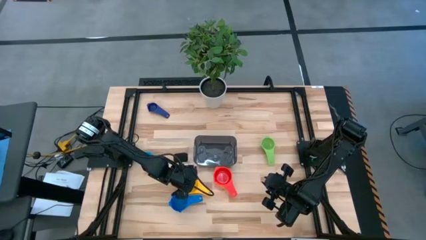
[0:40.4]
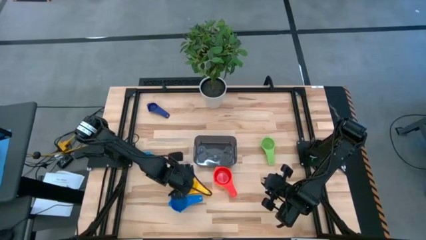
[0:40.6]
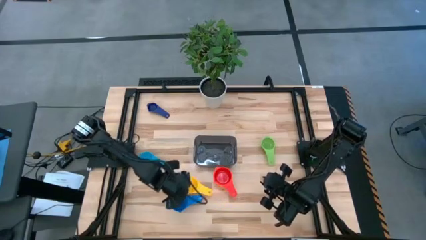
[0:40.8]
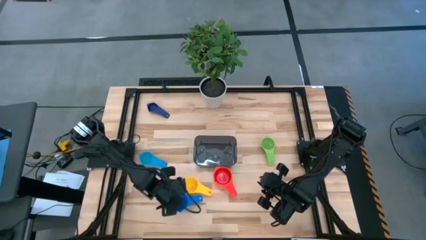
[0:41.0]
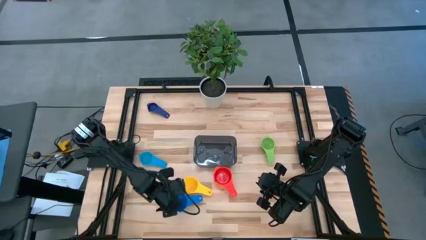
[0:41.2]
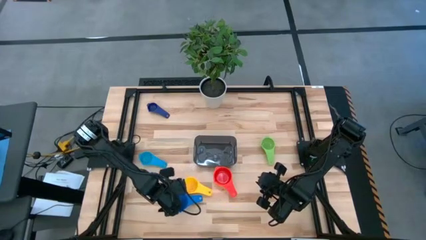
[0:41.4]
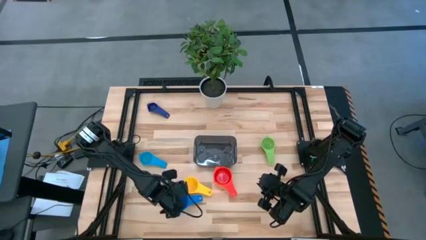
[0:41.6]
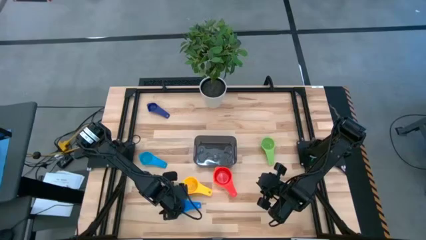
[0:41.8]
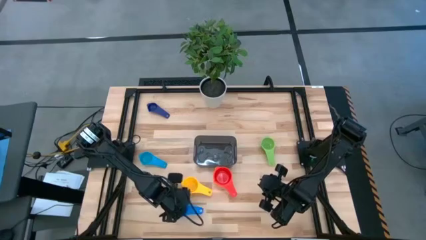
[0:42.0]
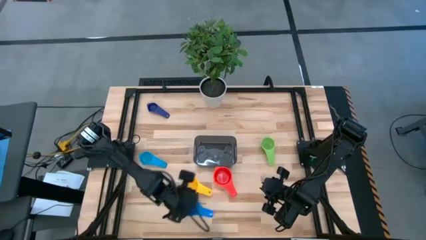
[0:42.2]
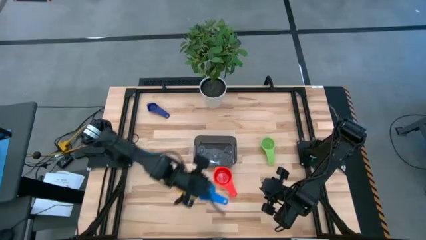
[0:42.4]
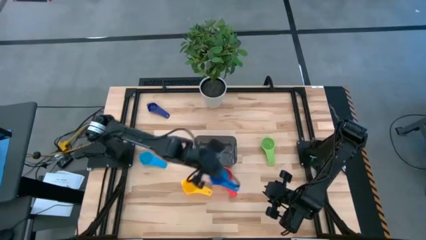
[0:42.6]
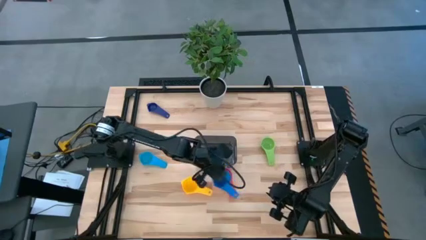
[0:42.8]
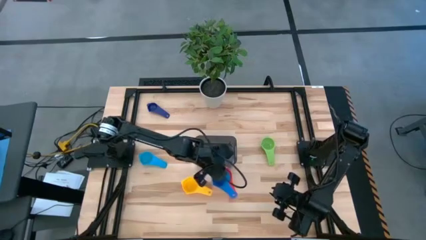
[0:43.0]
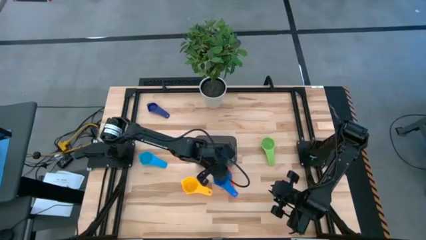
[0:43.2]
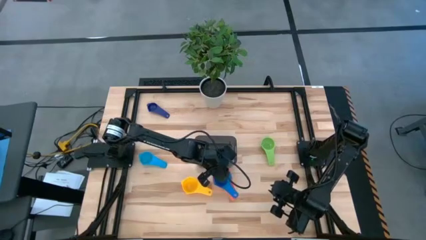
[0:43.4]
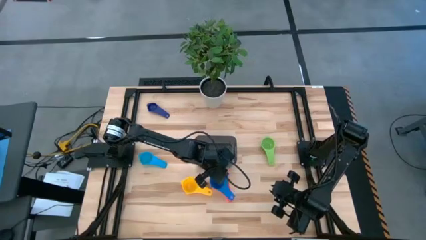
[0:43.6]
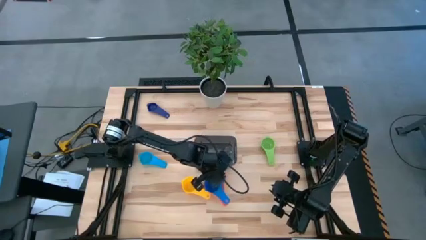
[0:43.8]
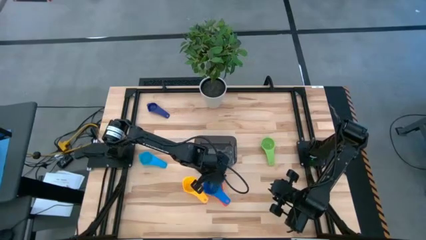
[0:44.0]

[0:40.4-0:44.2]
Task: Nest measuring cups in basket
Stack the blue measuring cup on the top of red measuring cup

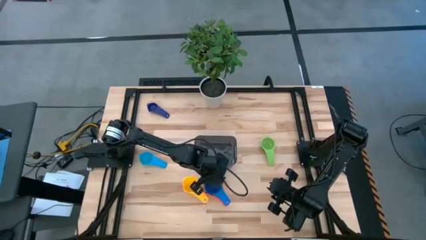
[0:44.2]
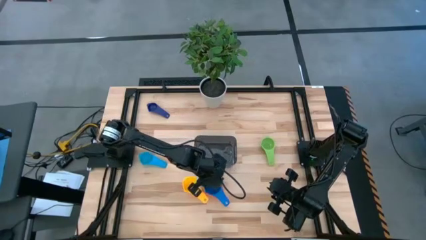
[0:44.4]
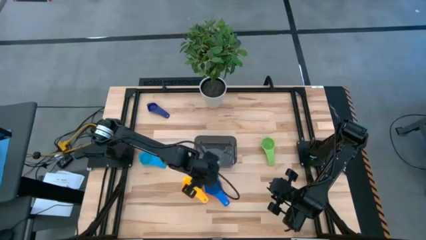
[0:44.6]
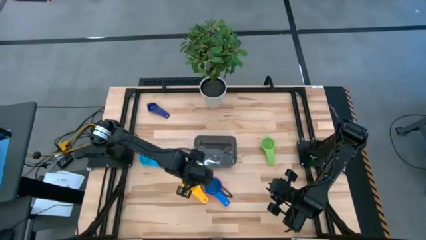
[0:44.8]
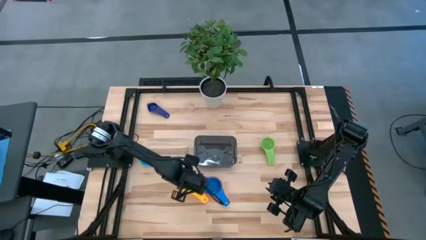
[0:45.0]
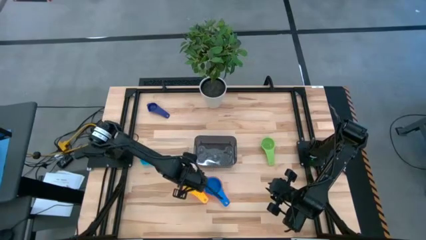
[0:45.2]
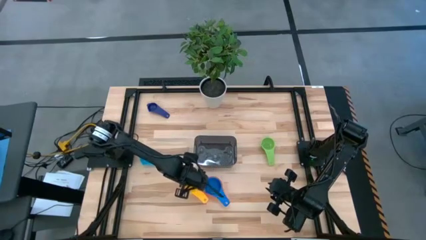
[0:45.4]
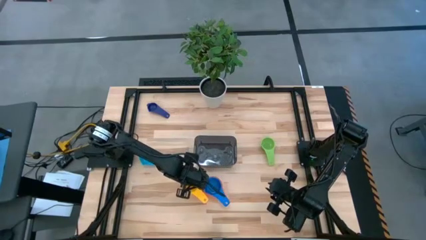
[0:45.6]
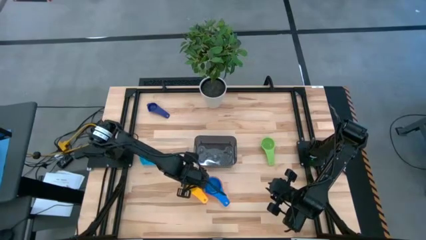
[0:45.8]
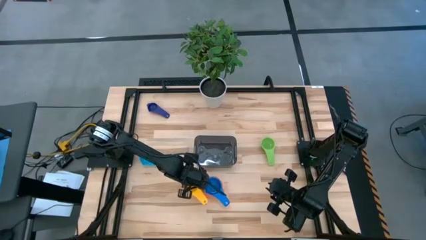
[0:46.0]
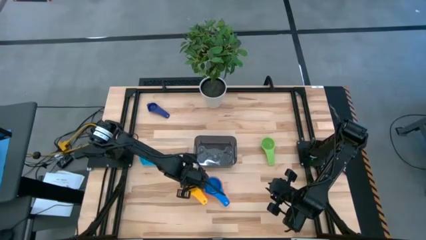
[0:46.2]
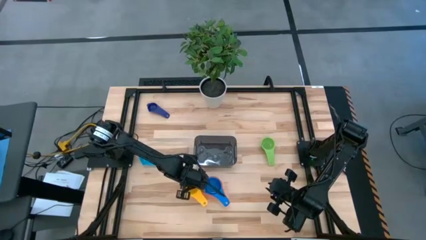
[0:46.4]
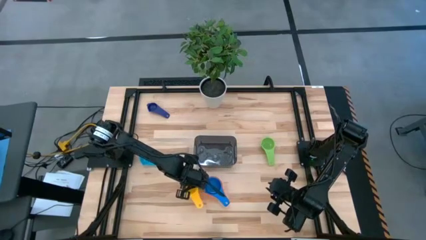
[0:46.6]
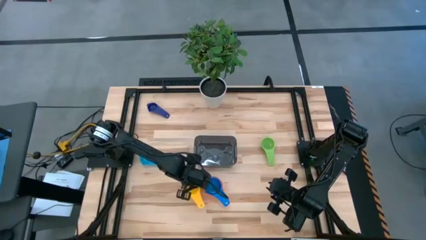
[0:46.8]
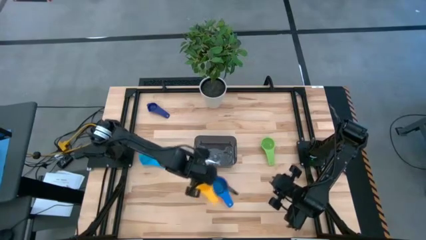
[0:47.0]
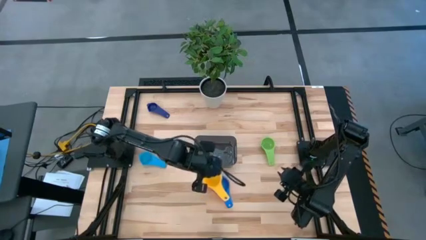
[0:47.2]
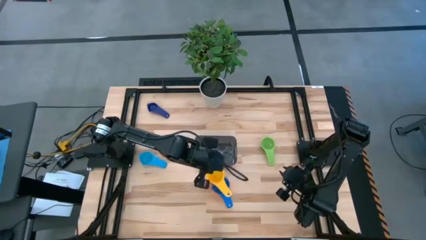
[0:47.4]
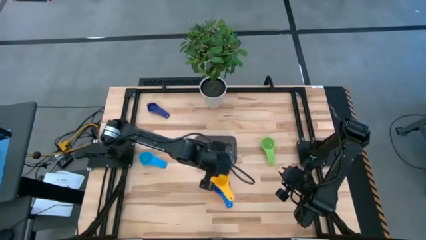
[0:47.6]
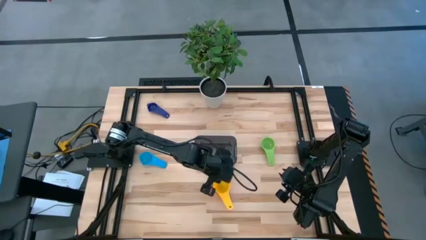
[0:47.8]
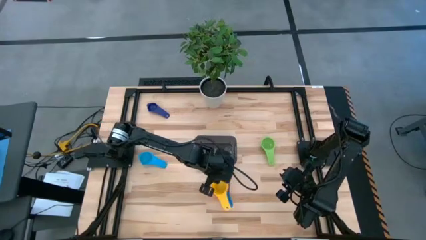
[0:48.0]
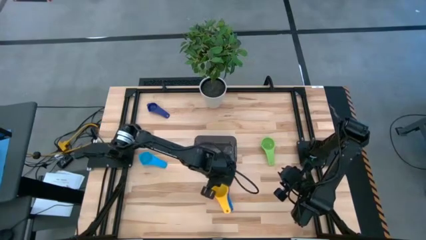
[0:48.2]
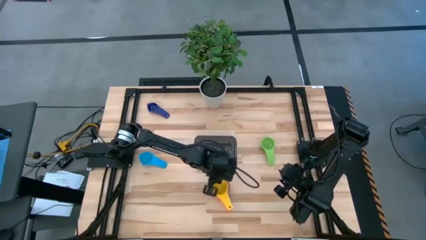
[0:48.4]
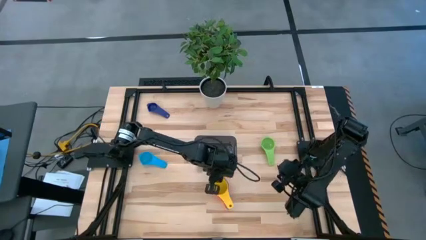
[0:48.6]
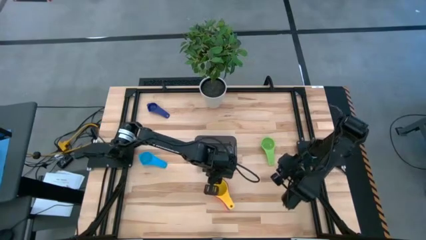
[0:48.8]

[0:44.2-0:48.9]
Stack the yellow measuring cup on the top of blue measuring cup

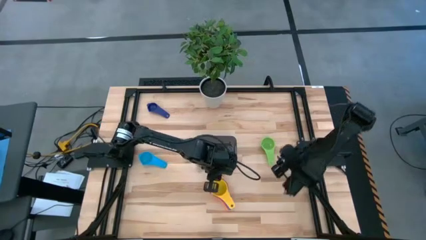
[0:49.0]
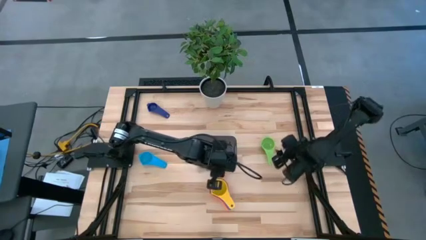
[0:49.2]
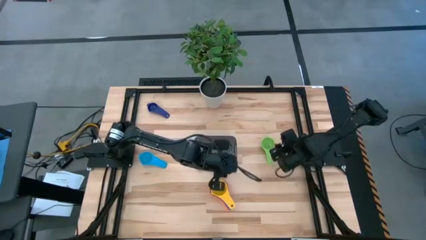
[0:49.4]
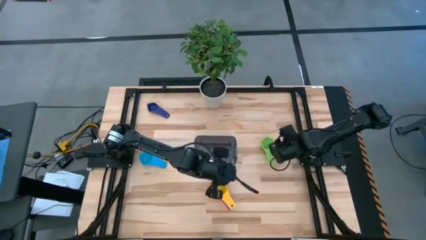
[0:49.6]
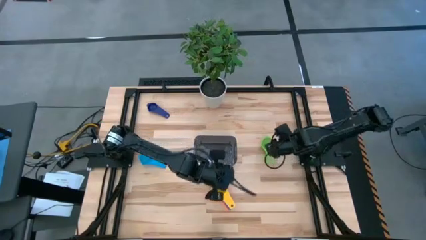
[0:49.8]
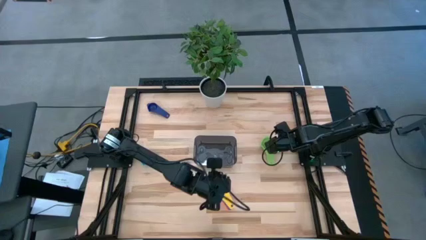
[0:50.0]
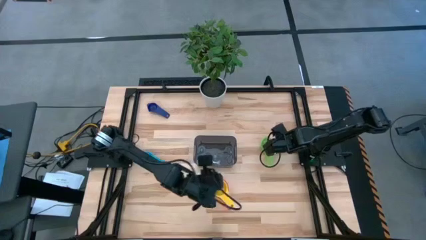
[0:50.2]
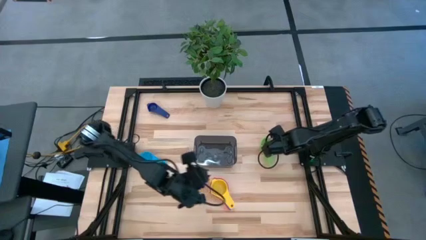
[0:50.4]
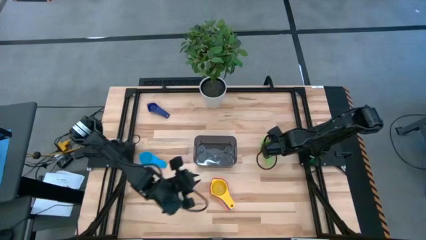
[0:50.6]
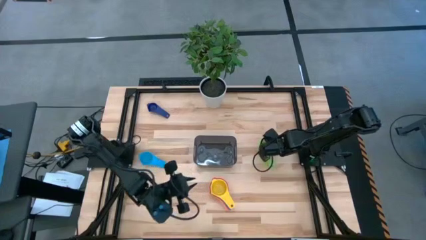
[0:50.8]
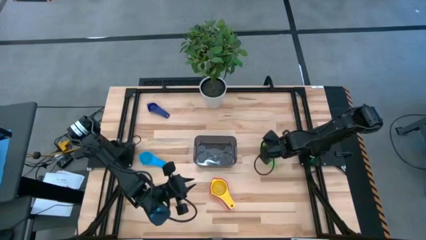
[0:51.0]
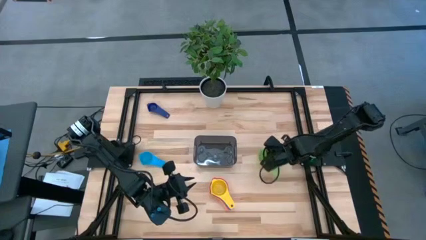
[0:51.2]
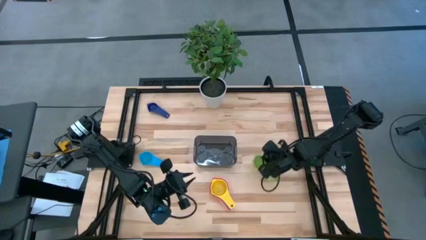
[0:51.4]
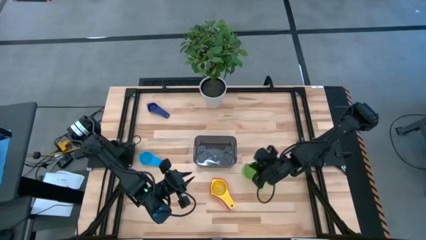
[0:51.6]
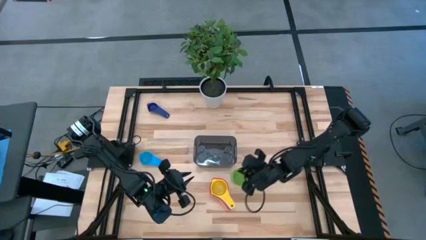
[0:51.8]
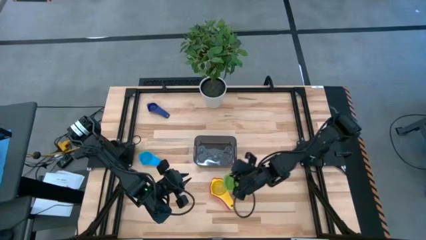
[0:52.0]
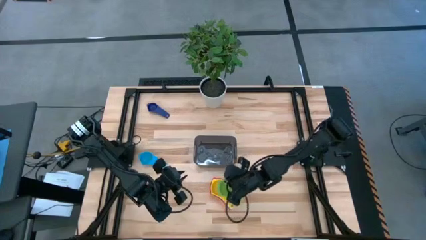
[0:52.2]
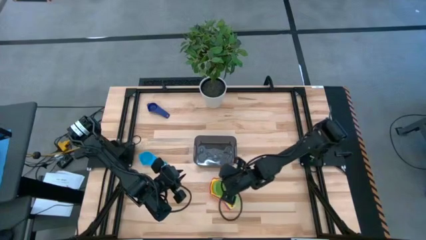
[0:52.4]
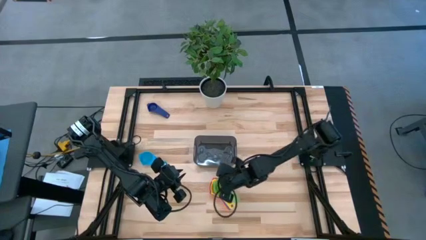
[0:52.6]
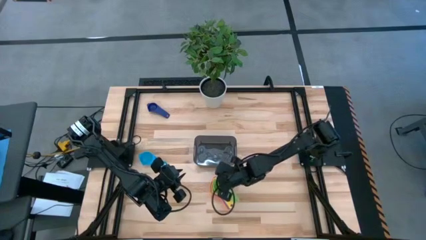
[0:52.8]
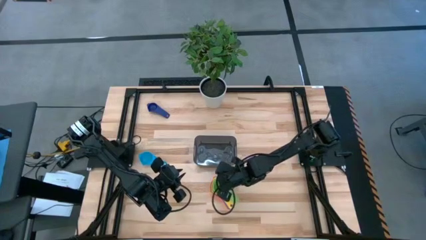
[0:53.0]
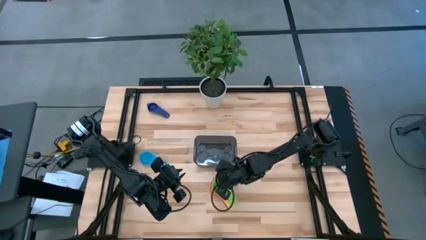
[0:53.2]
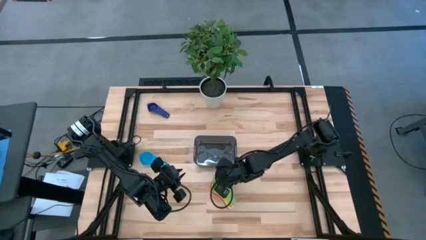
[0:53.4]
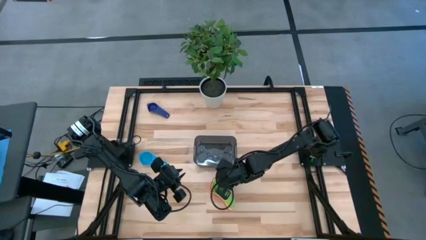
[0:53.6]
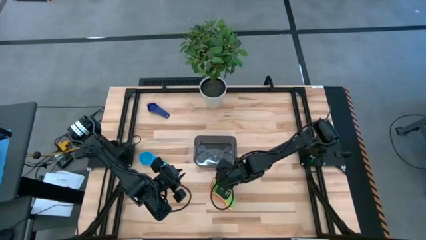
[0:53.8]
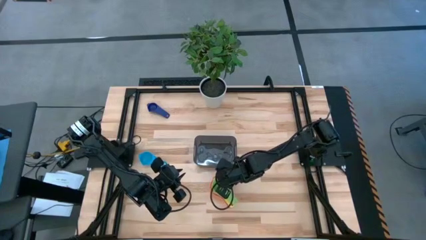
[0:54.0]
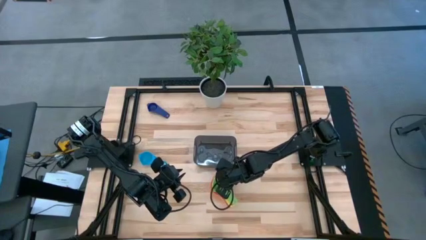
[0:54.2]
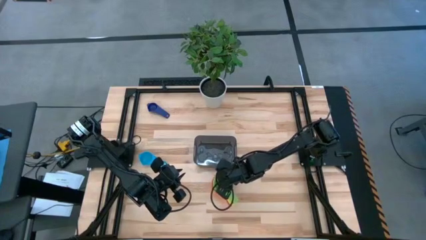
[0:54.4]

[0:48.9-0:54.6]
Stack the green measuring cup on the top of yellow measuring cup

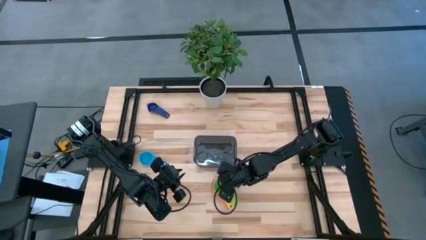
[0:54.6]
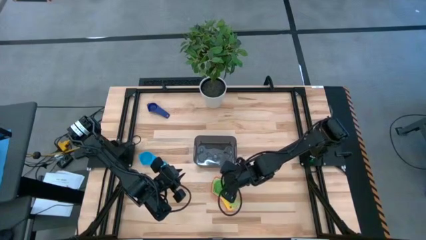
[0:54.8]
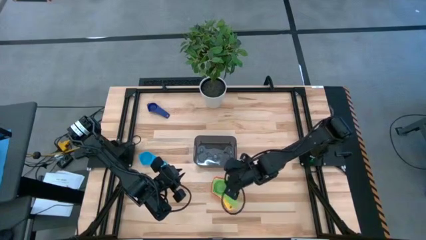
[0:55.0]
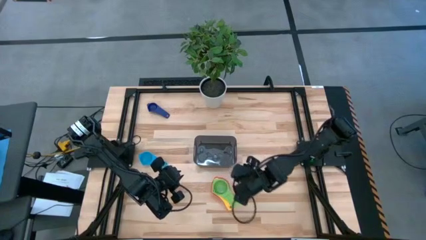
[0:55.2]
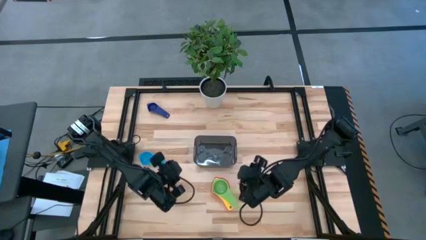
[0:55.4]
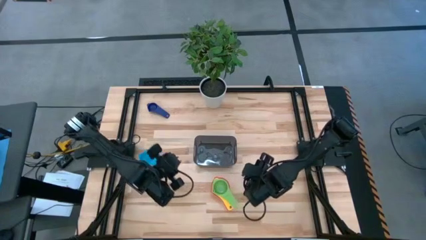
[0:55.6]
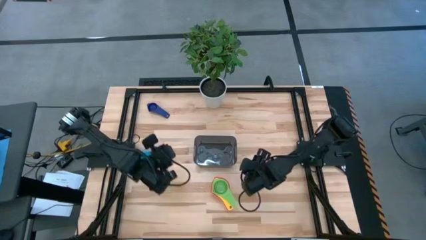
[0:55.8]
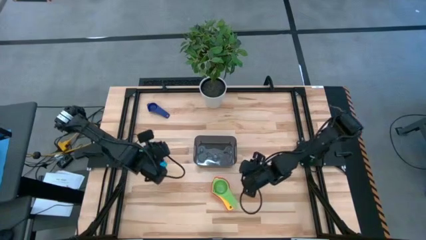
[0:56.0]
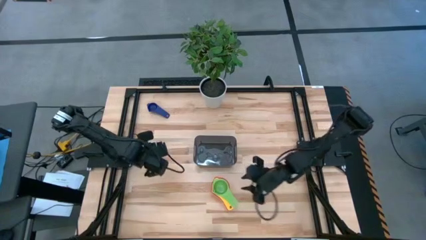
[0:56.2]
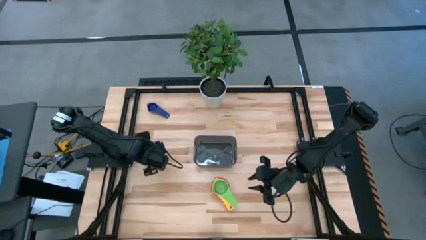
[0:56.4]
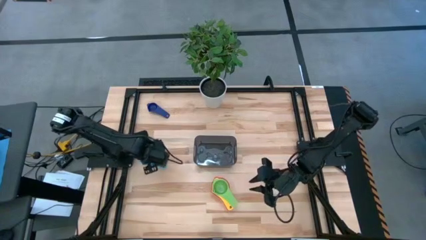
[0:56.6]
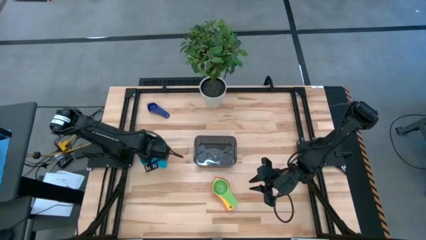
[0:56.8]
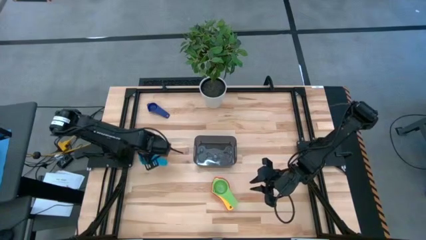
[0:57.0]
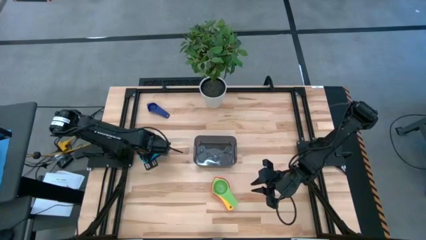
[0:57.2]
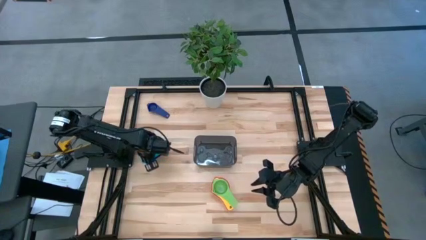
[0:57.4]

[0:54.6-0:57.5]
Stack the light blue measuring cup on top of the green measuring cup
